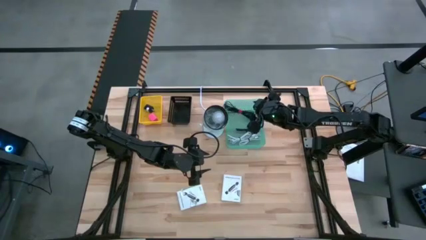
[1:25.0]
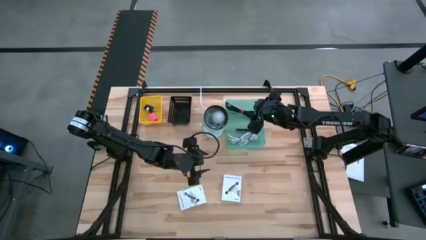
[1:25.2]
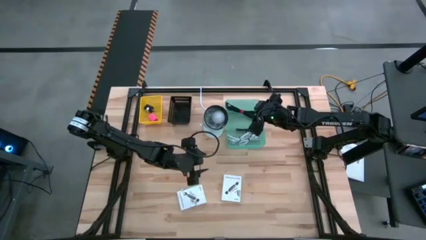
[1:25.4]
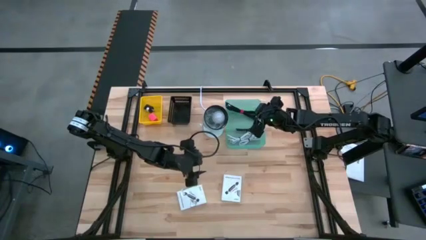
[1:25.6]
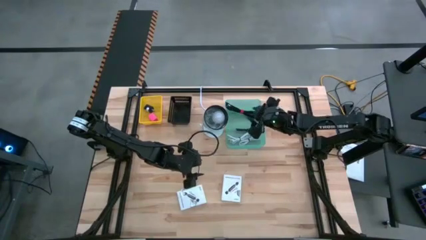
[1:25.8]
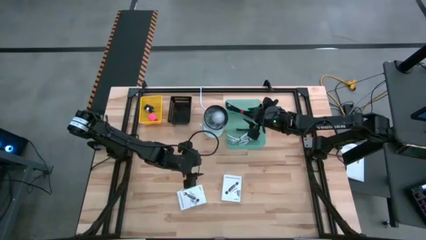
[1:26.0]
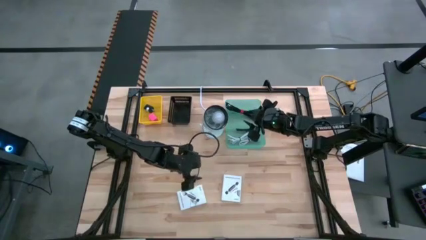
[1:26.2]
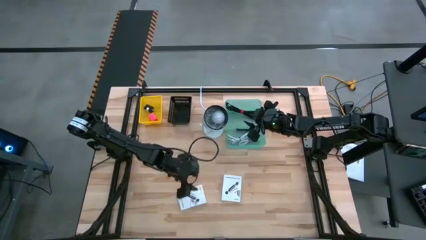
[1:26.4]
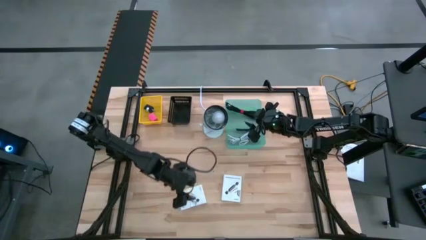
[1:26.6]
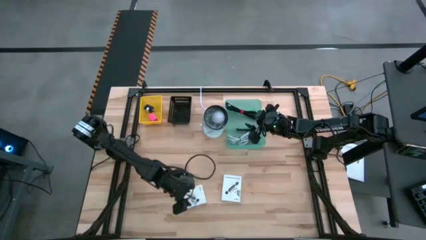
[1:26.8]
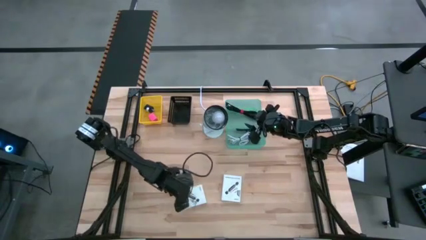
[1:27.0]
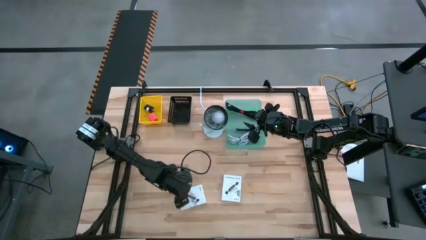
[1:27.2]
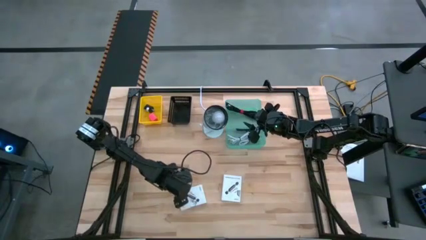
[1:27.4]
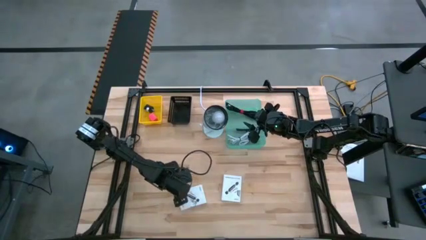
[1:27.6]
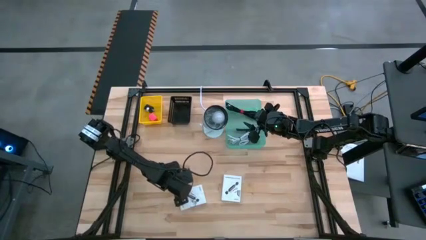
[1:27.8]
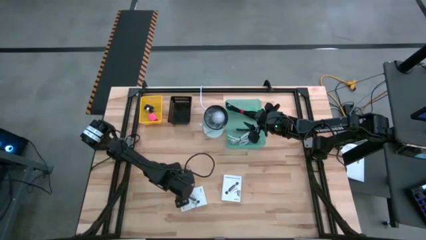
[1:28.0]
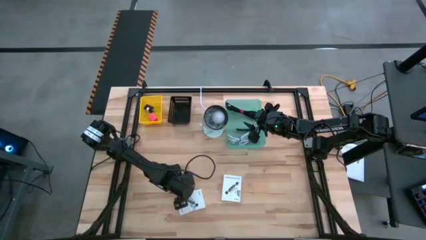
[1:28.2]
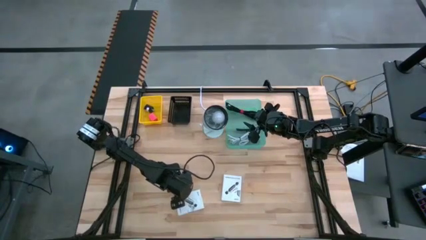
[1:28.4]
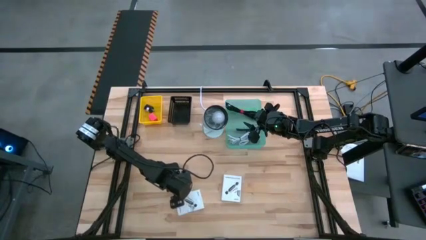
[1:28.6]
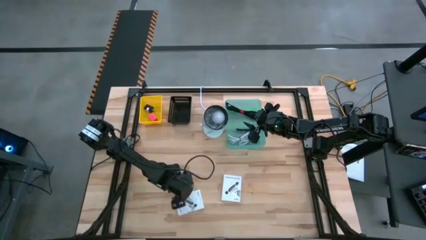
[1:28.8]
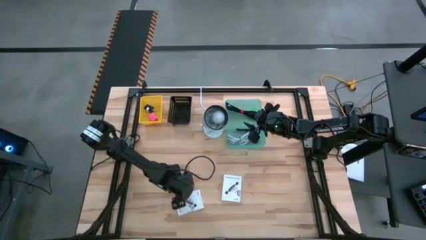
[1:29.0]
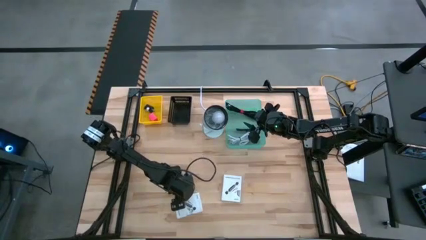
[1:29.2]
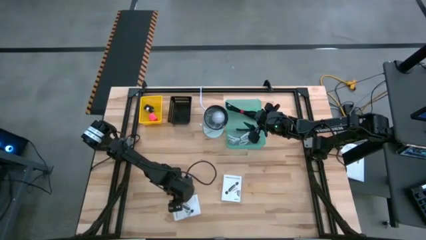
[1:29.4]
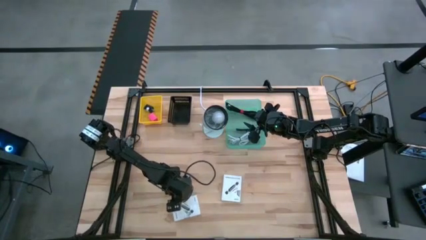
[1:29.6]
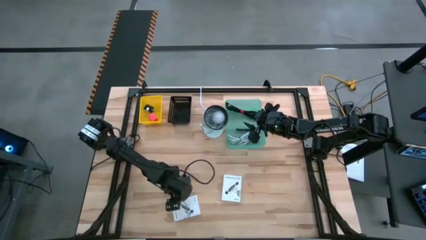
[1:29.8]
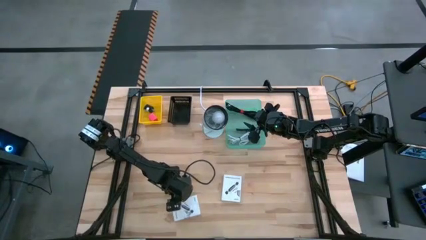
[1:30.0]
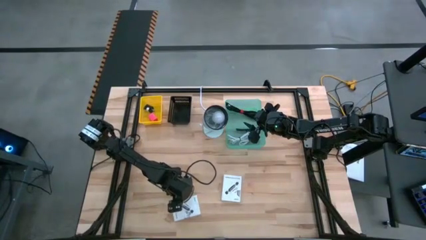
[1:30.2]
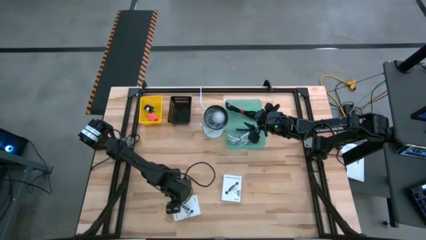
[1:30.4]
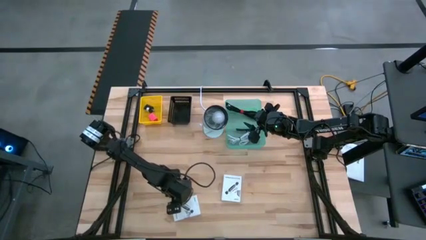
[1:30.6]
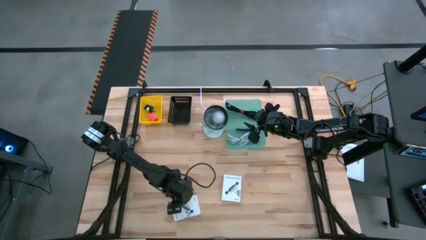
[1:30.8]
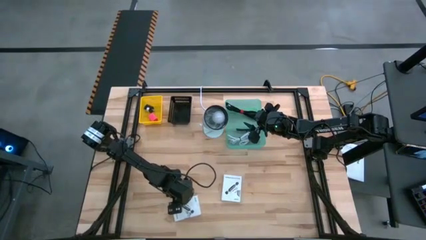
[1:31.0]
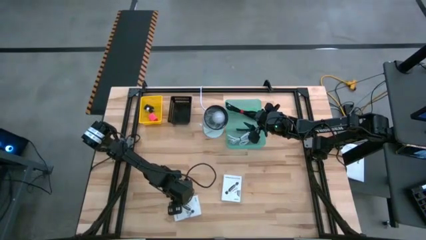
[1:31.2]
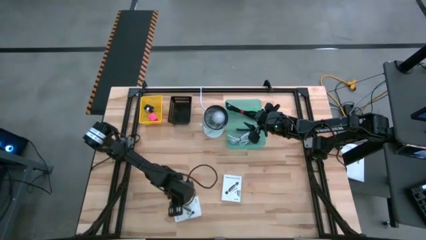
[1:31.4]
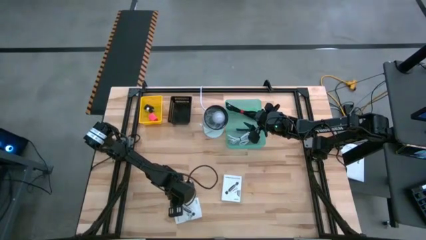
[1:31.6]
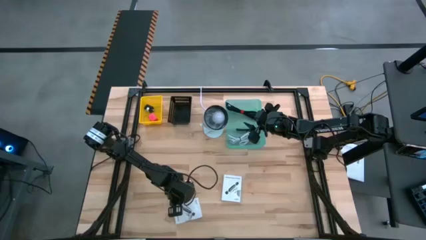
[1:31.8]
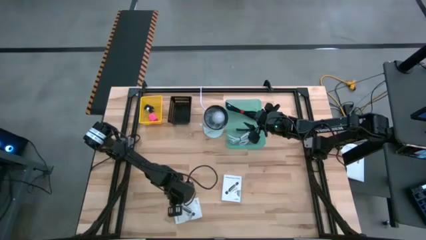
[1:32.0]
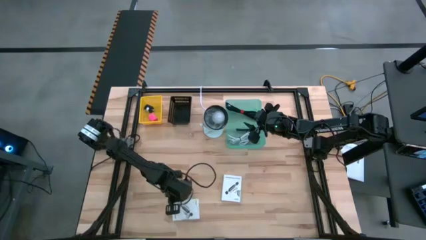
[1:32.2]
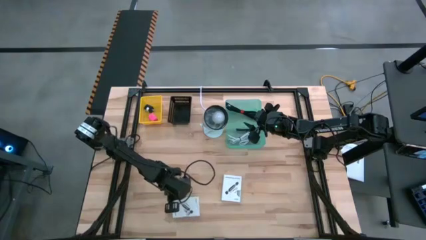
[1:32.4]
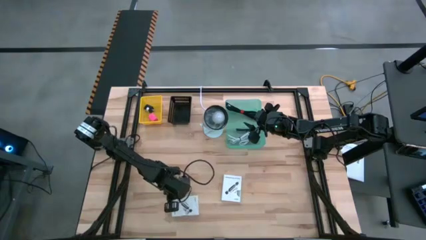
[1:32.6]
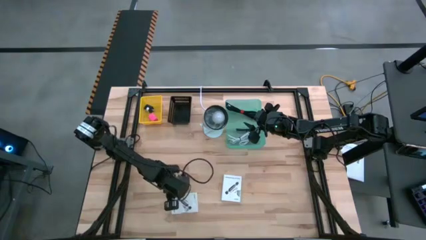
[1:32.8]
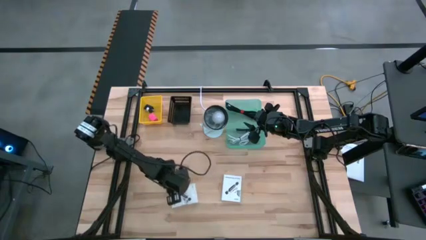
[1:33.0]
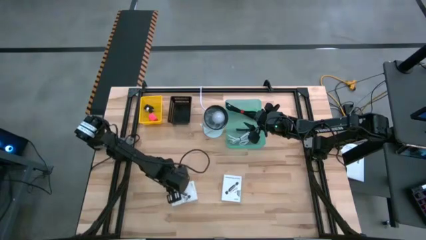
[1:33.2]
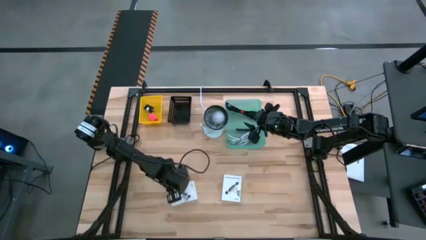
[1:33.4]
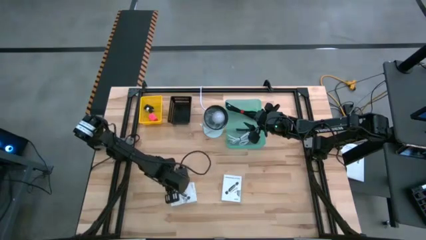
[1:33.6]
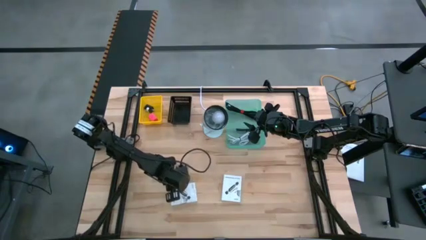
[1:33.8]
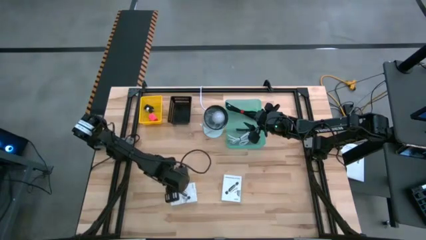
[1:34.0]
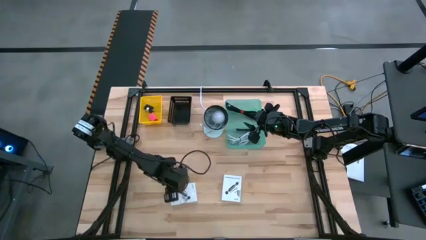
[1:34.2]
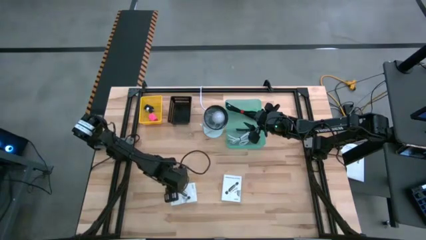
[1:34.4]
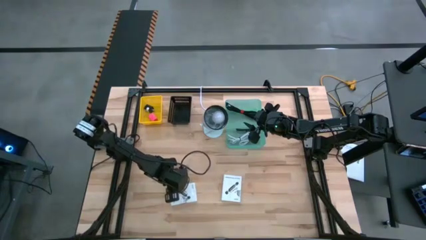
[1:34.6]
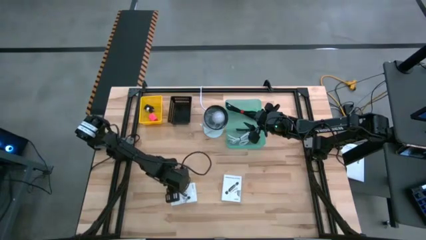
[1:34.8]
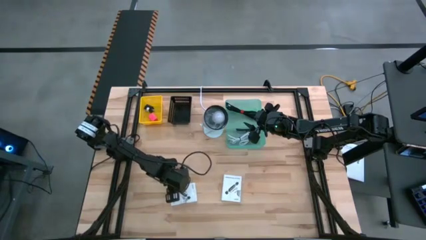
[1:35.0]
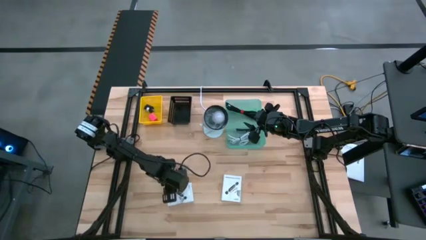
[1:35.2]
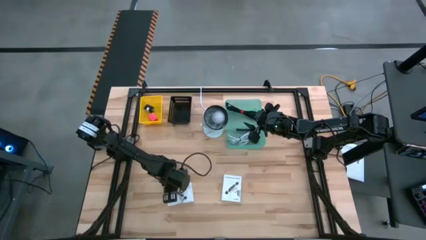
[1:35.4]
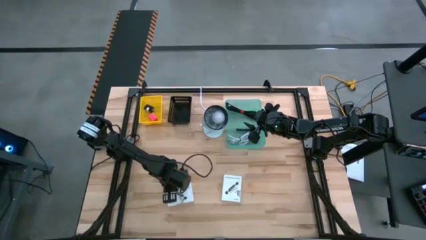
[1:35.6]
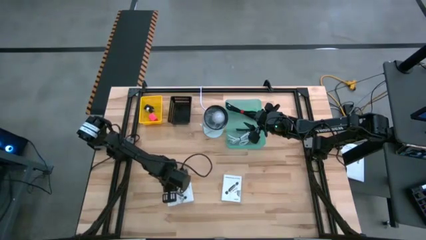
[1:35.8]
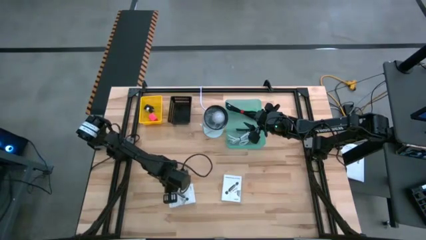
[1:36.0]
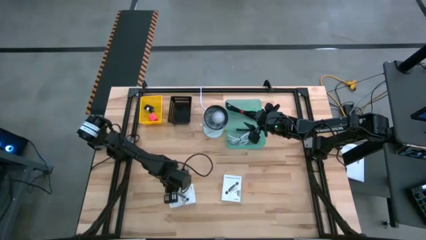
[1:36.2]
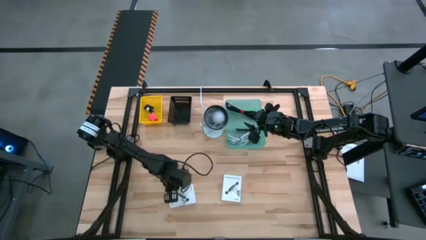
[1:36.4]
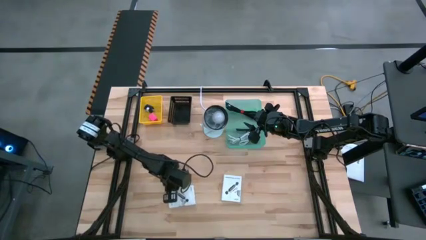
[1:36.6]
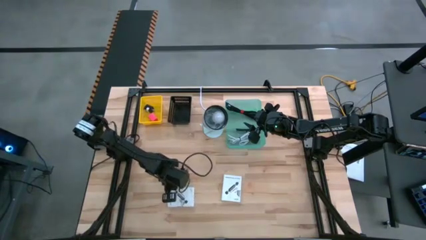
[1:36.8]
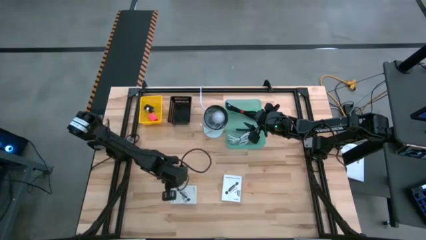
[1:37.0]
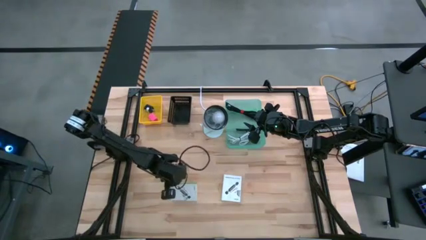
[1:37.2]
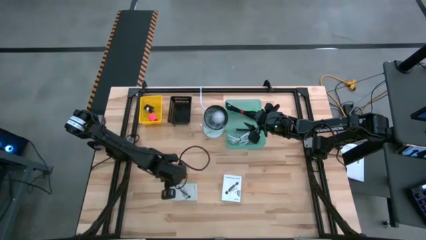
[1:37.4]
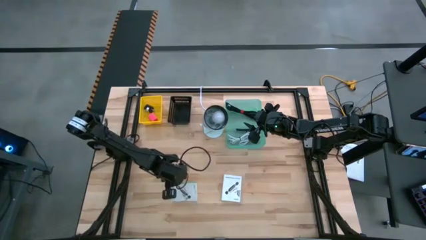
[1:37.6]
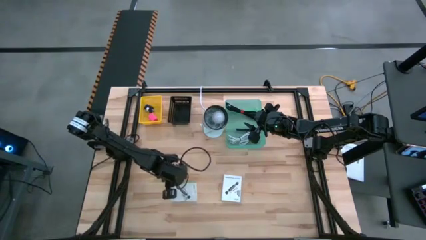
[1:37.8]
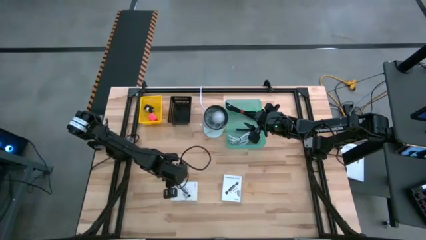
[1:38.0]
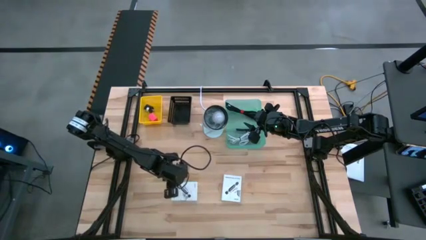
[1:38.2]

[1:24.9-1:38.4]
Task: Pick and place items into bin
Put the right card reader box into the black bin

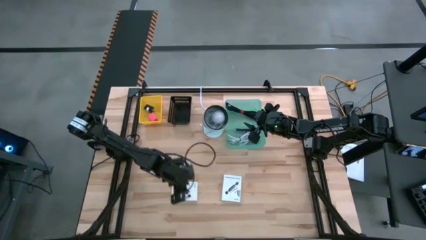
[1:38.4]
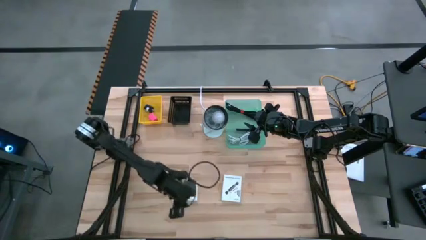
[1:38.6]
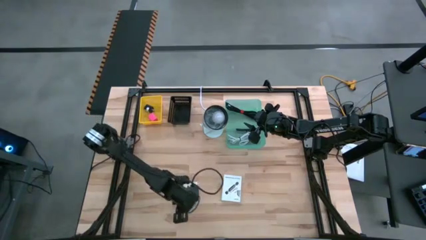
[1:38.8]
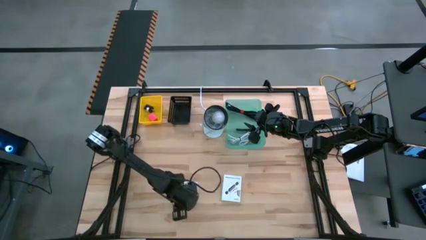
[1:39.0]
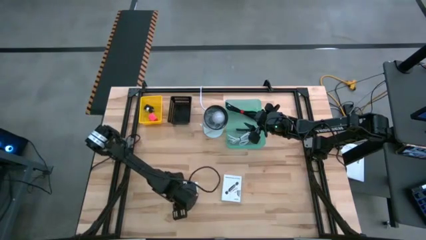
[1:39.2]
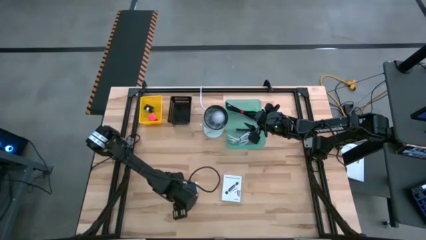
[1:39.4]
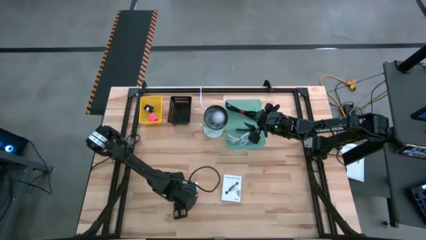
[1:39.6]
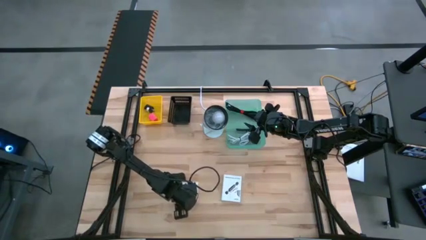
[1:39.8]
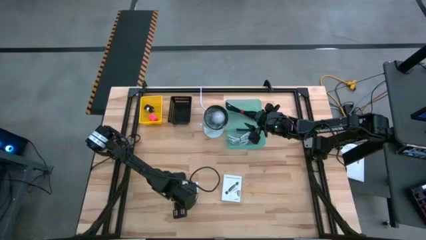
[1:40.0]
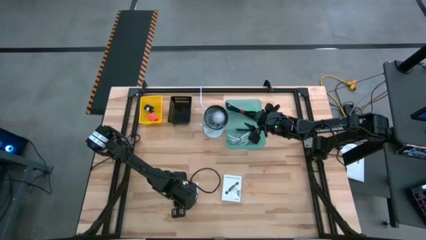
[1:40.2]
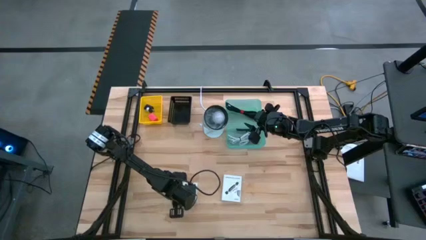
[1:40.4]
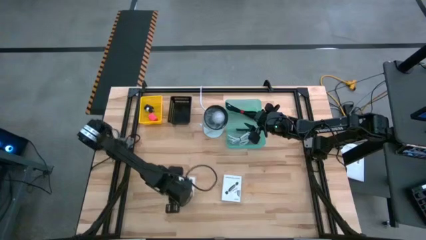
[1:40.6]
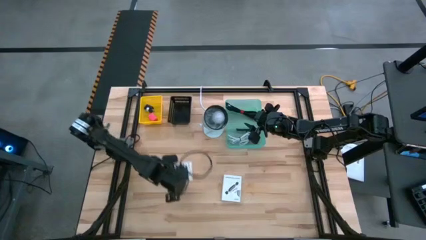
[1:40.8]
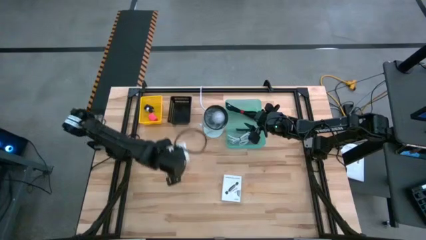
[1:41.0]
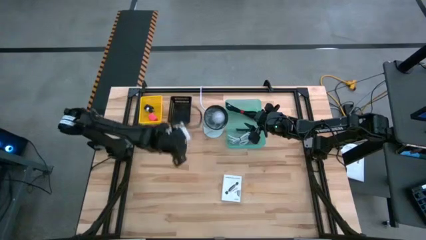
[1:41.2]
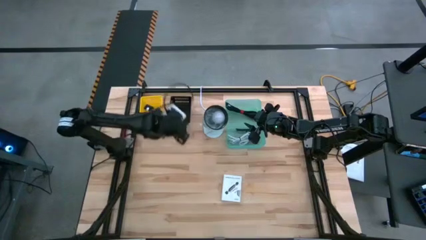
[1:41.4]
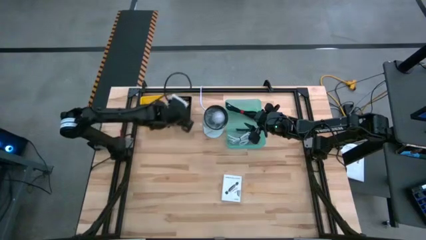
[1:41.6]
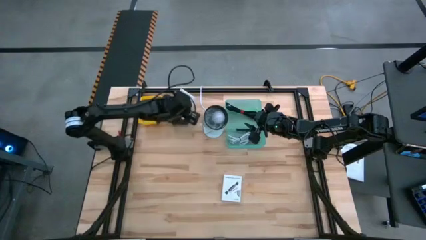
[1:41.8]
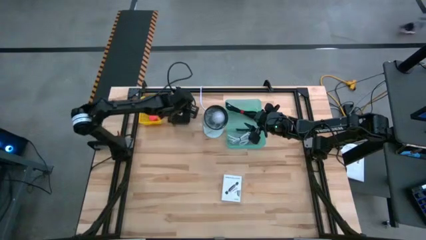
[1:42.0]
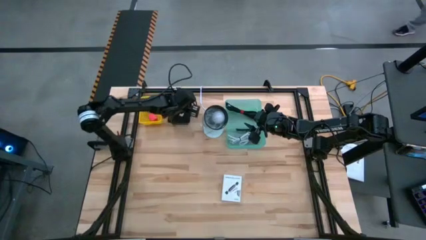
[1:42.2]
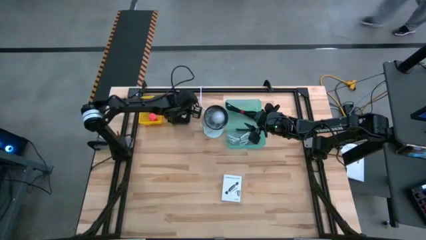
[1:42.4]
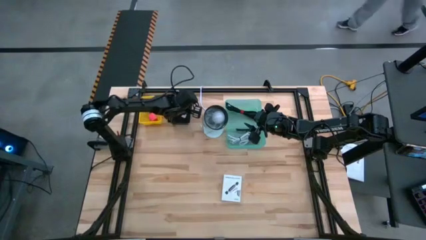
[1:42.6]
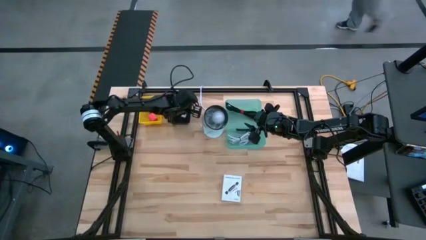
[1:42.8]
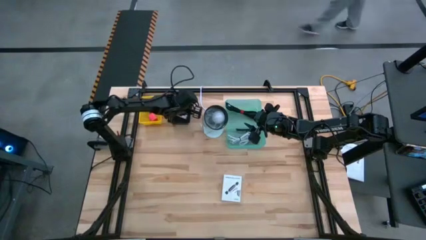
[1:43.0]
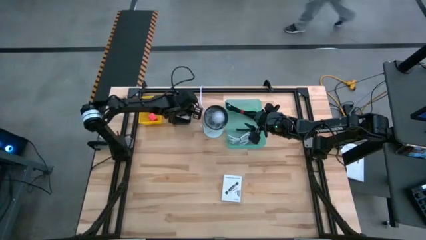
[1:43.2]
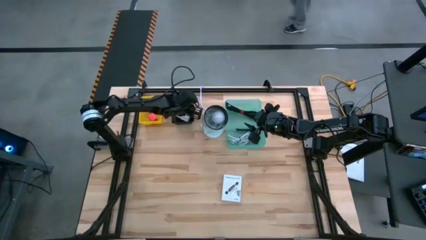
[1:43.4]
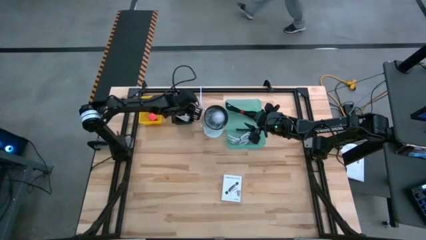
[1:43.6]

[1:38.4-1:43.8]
Put the right card reader box into the black bin
